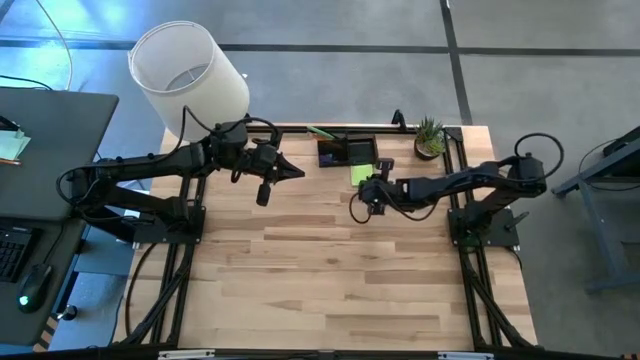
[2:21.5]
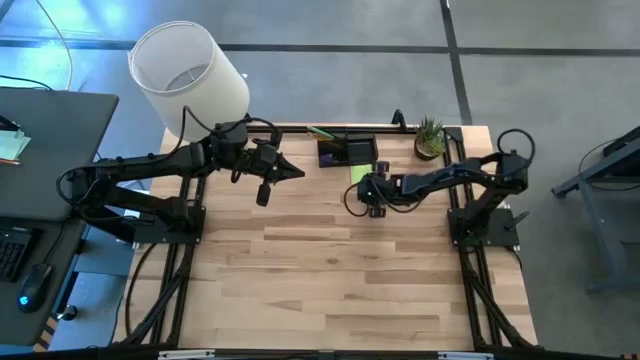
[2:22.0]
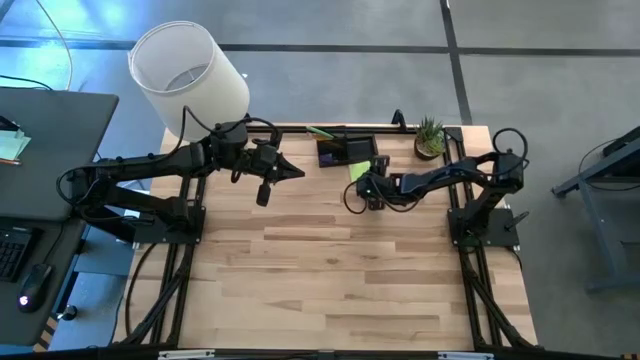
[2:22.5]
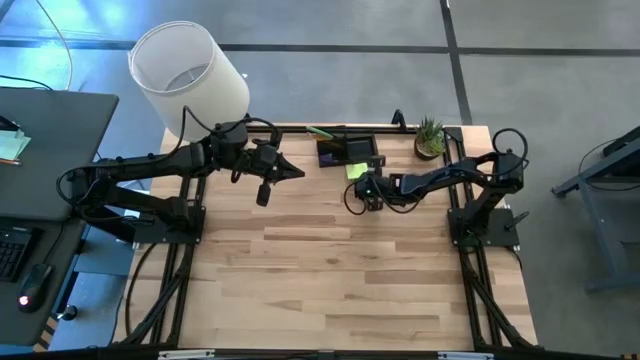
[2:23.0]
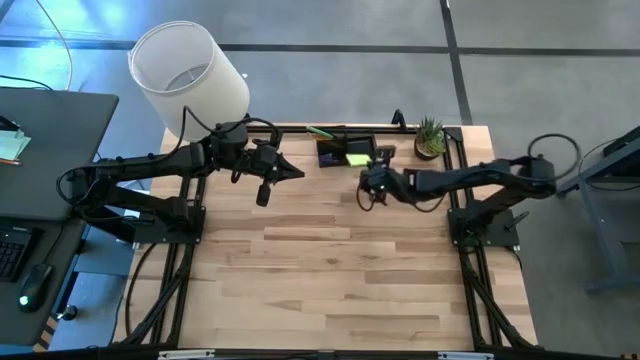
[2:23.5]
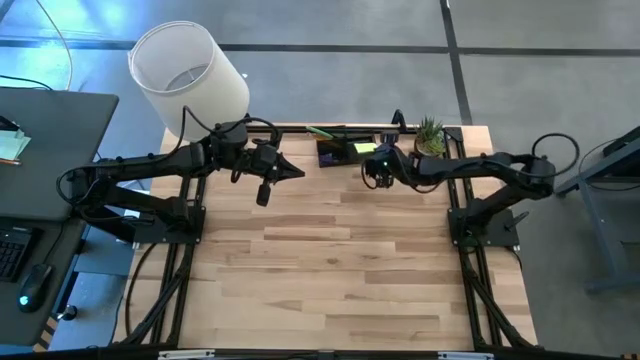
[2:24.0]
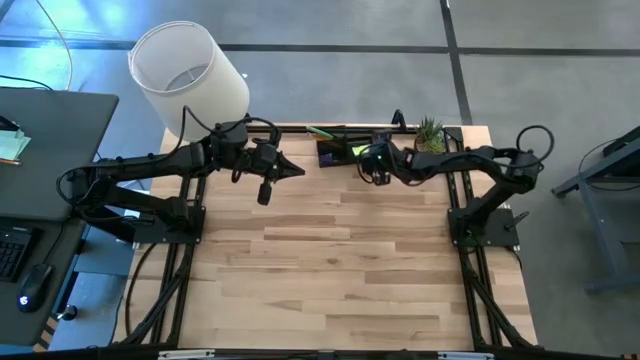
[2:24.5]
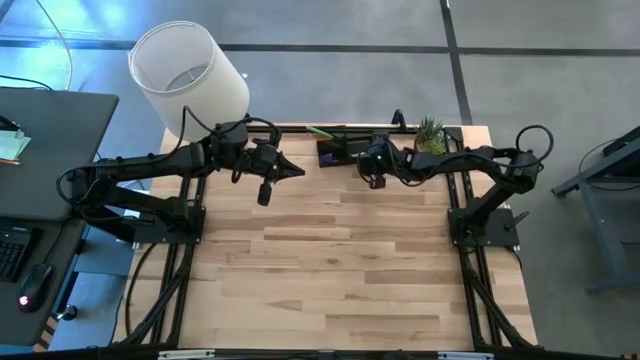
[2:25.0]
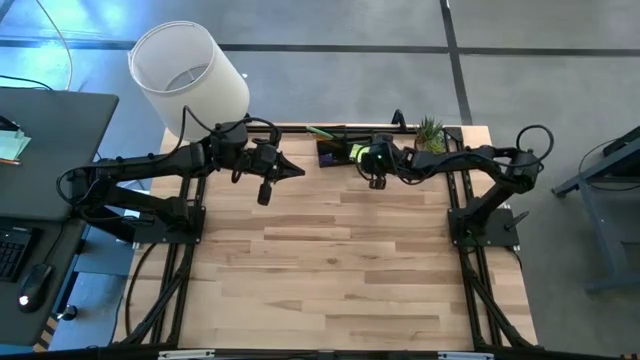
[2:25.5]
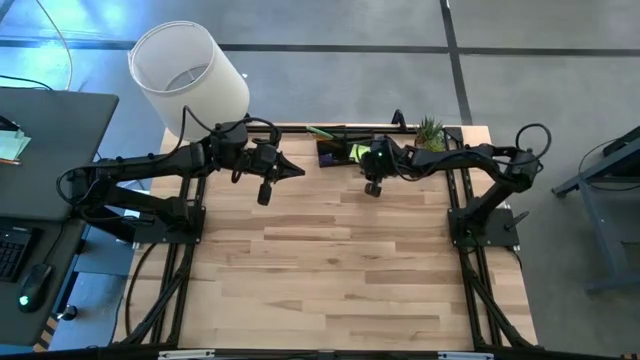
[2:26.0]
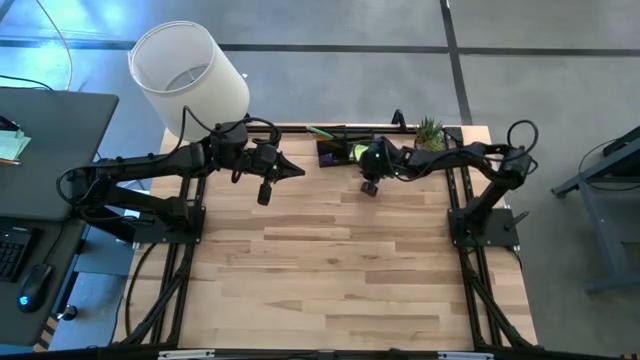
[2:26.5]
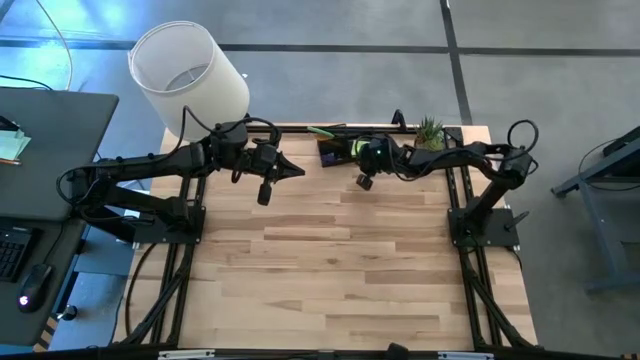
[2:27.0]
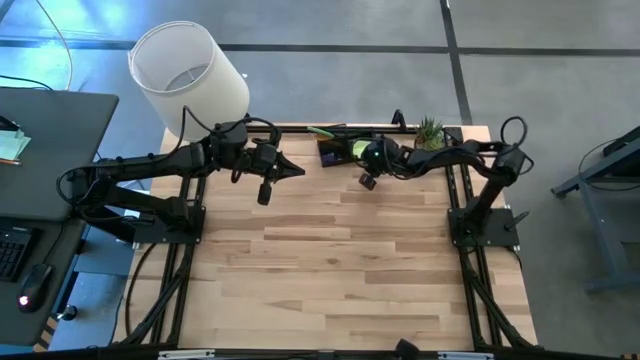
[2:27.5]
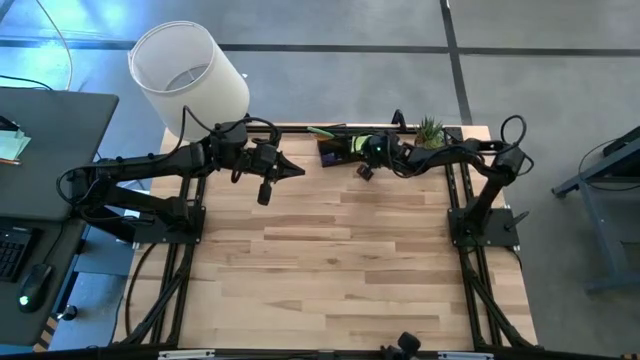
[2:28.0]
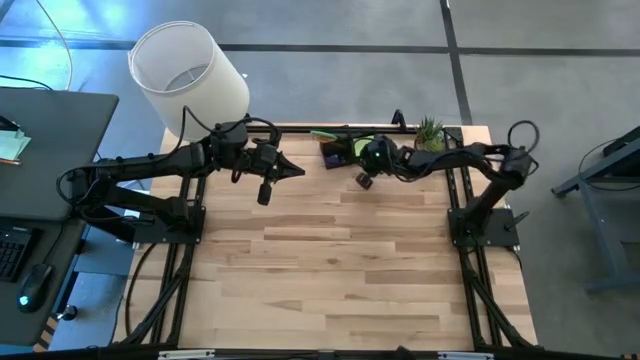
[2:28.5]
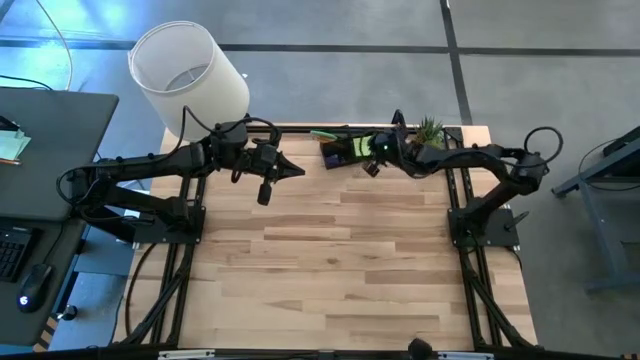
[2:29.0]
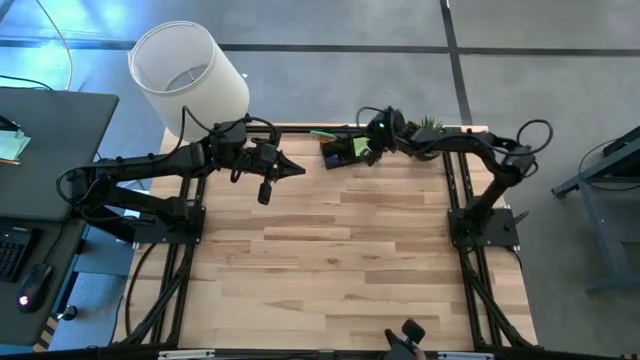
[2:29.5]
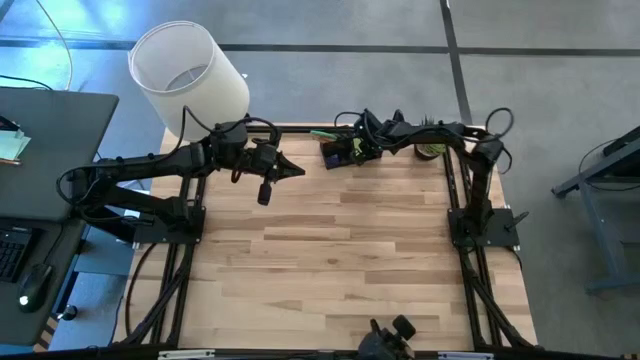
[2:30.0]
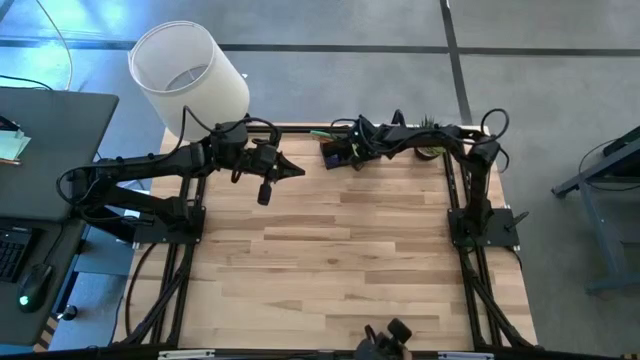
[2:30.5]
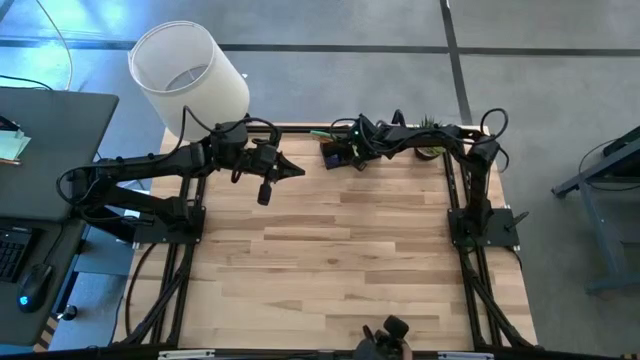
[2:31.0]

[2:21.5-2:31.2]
Task: Pick and place office supplies into organizer
Put the green sticky notes into the black desk organizer

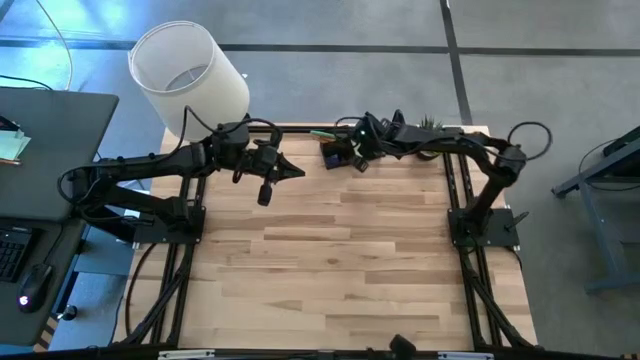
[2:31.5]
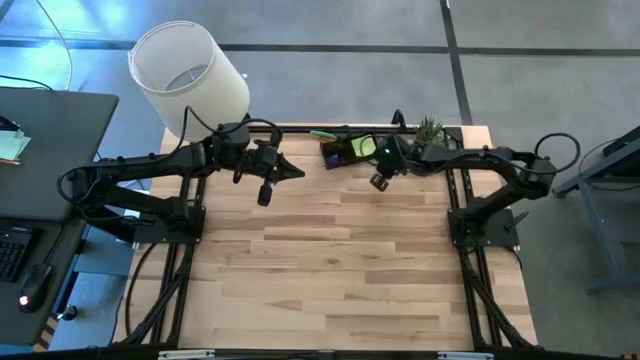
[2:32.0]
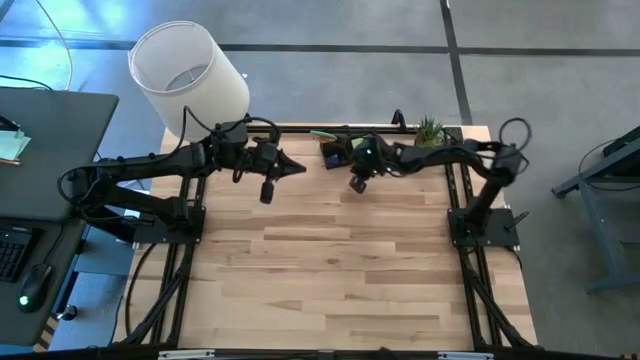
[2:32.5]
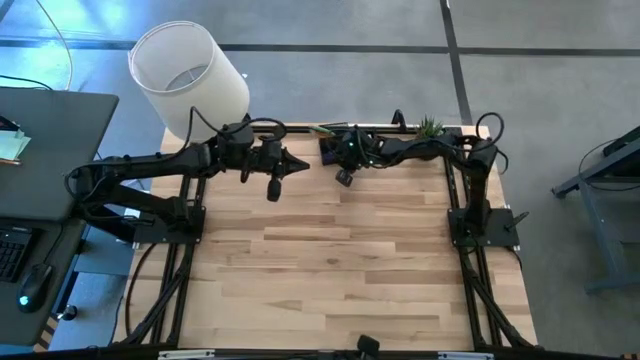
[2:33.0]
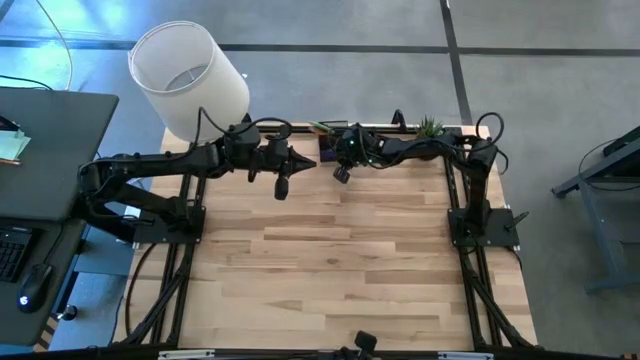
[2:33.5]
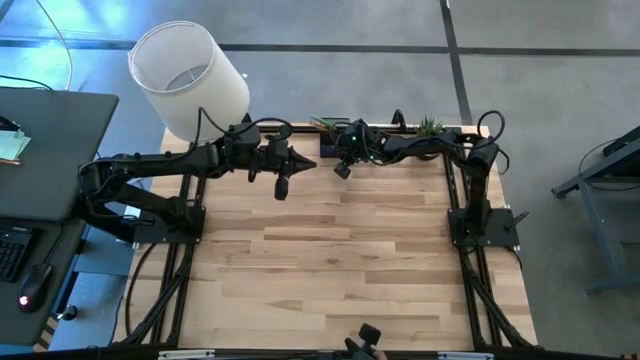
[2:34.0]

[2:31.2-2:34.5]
Adjust the black desk organizer

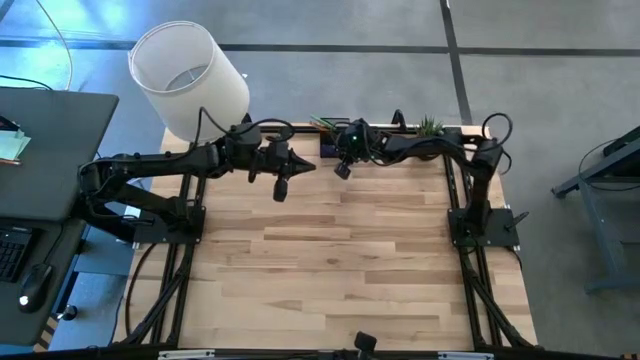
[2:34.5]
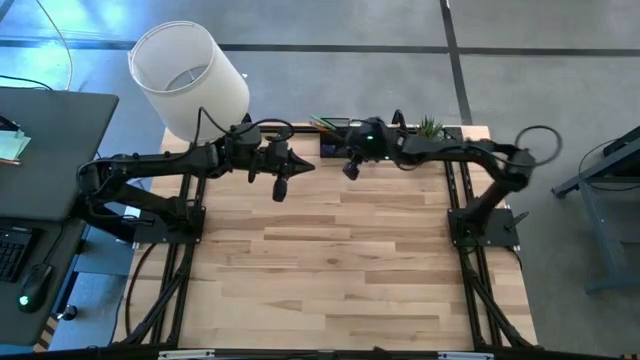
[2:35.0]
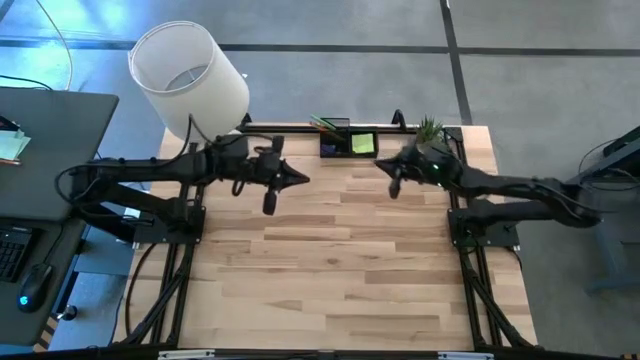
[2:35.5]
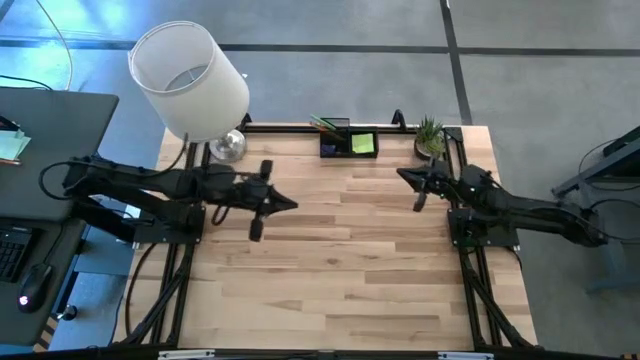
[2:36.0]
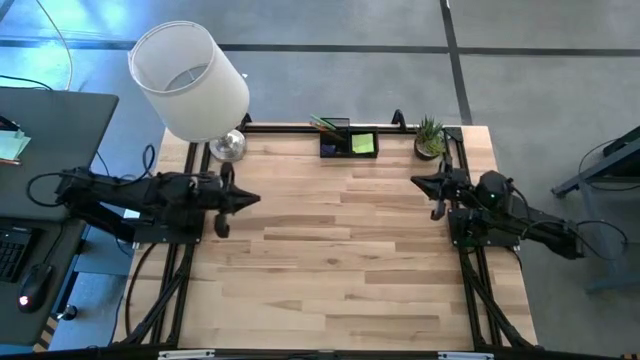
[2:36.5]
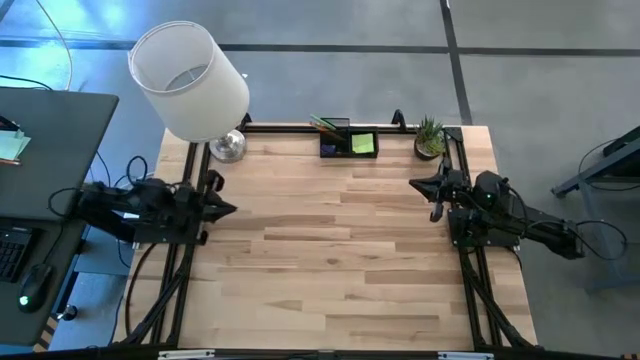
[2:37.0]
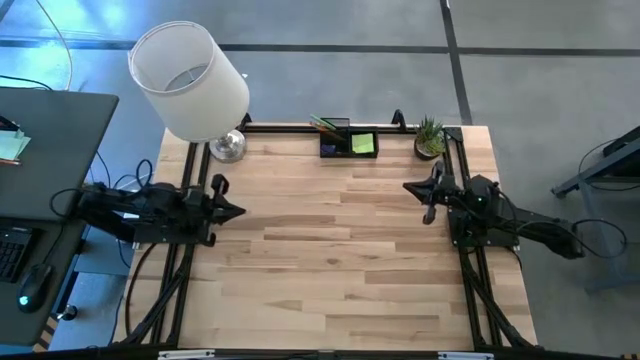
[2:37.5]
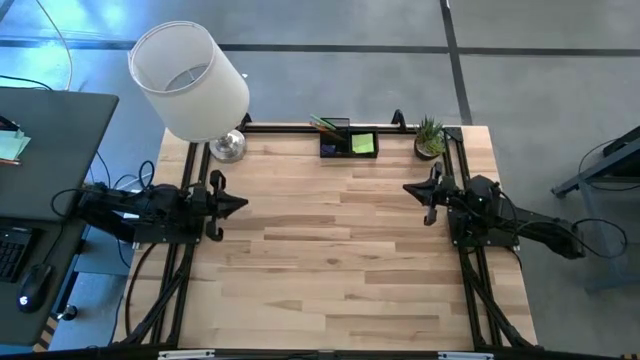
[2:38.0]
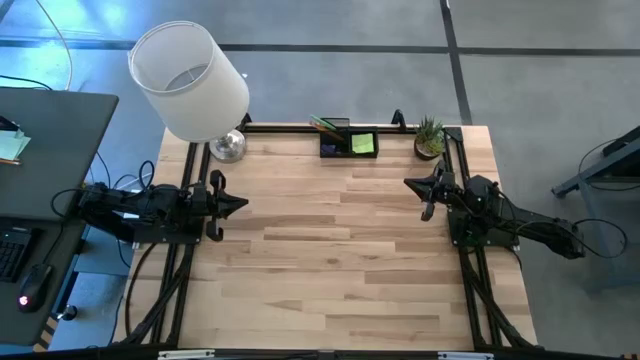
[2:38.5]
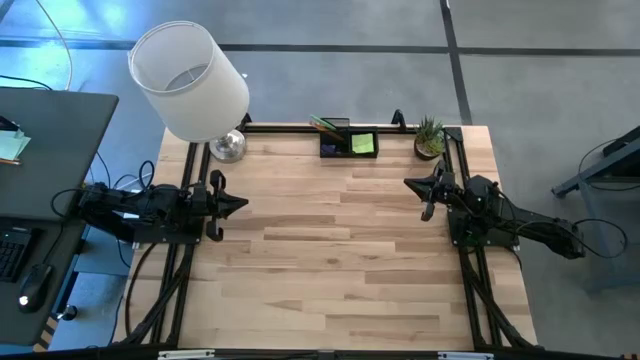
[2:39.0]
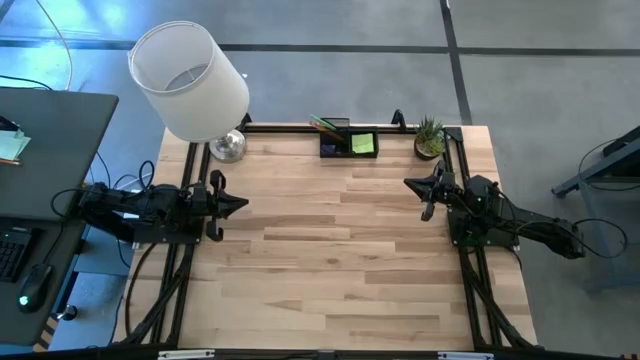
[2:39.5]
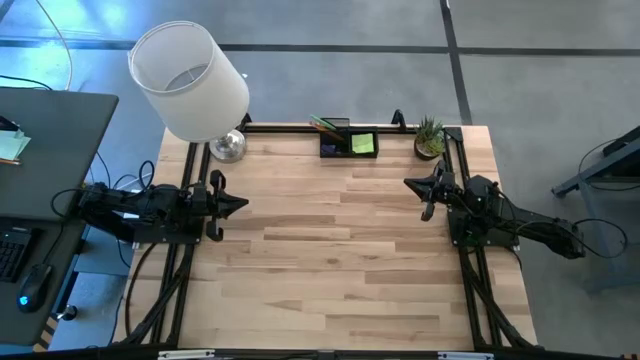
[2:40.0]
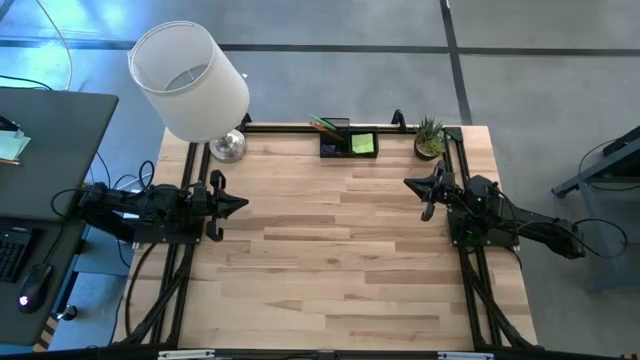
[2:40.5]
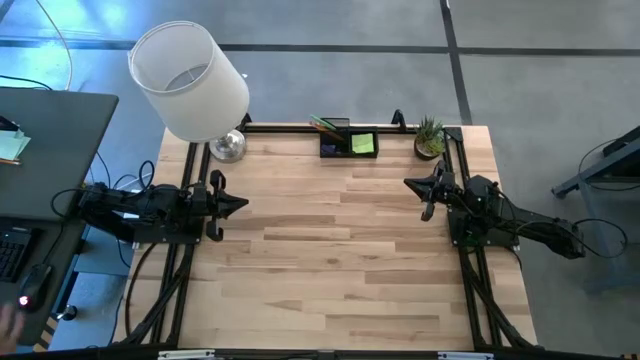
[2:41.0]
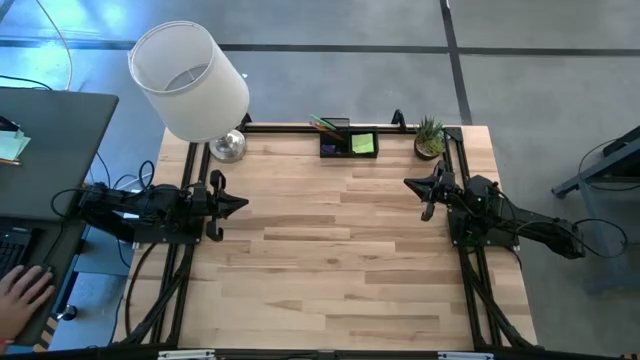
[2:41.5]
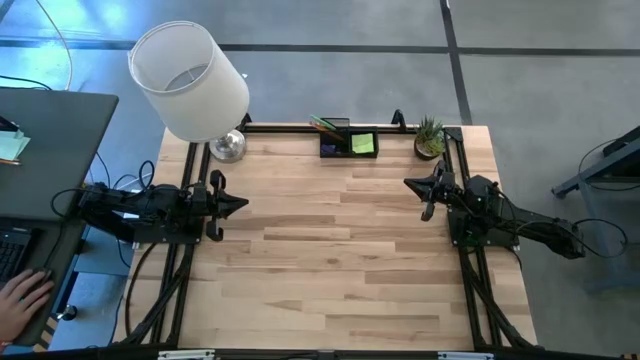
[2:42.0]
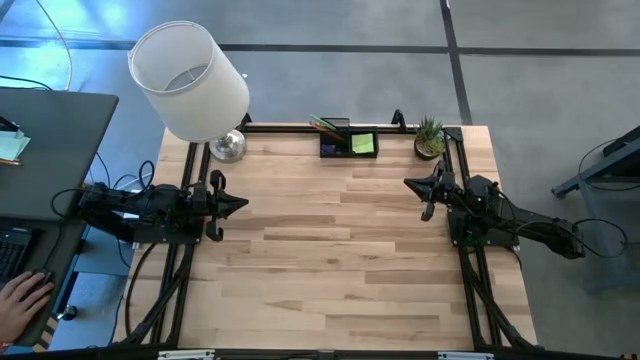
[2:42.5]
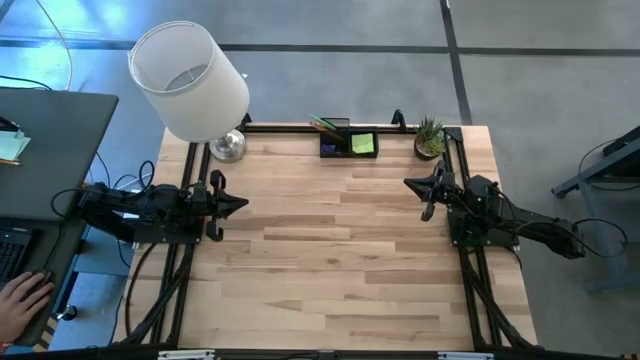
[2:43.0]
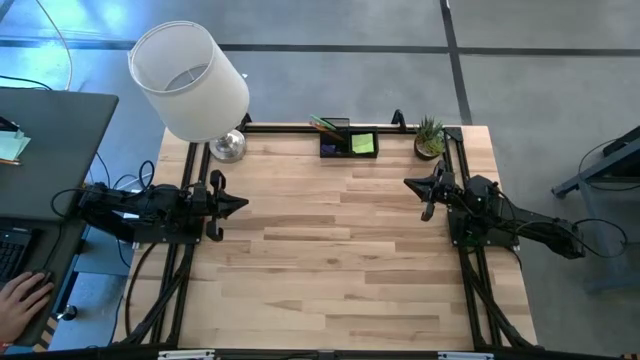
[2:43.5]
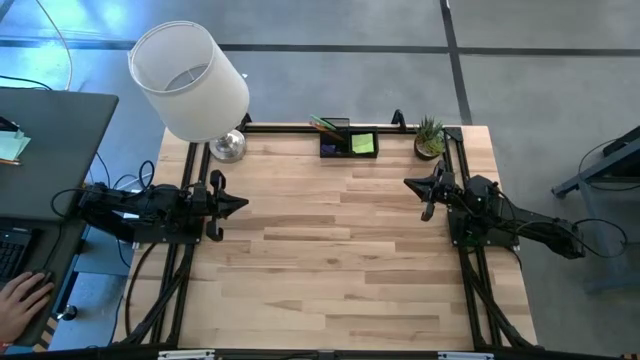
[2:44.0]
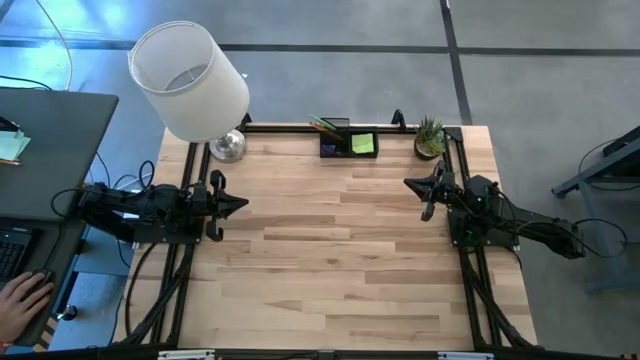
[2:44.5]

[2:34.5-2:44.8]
Return to Home Position
